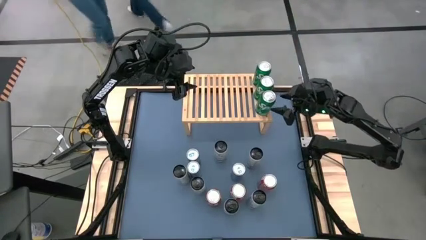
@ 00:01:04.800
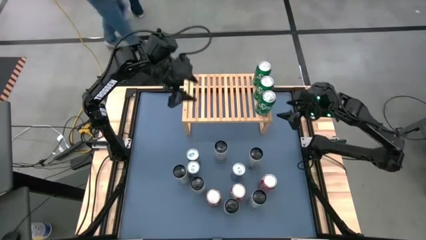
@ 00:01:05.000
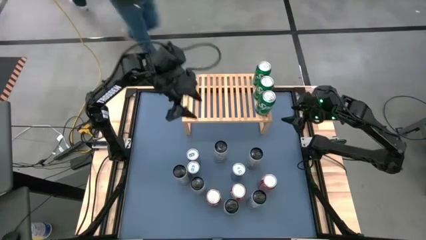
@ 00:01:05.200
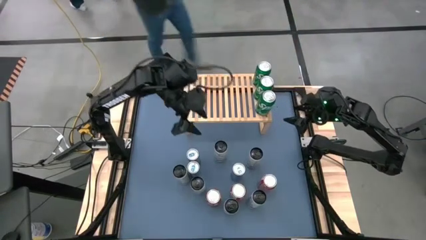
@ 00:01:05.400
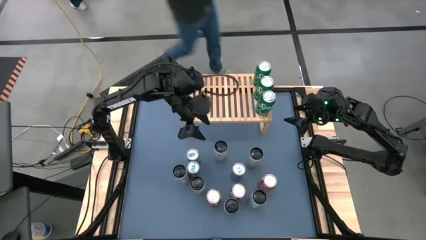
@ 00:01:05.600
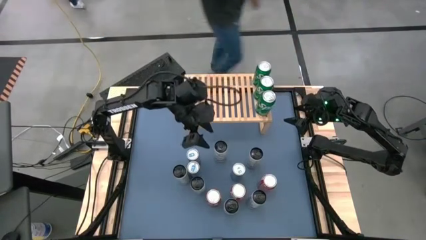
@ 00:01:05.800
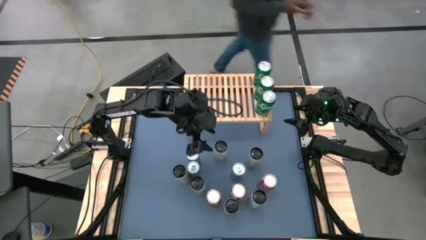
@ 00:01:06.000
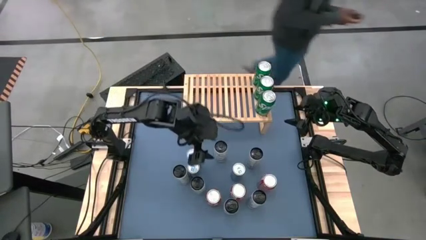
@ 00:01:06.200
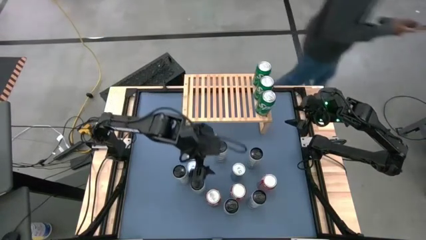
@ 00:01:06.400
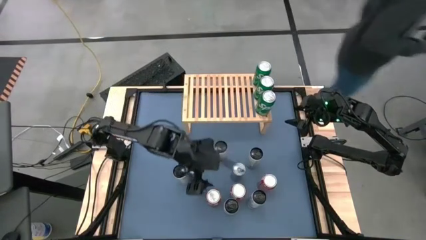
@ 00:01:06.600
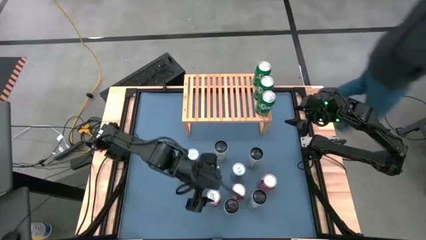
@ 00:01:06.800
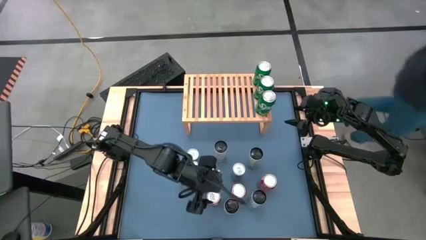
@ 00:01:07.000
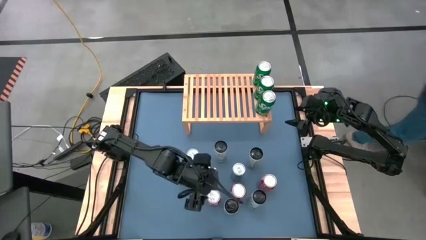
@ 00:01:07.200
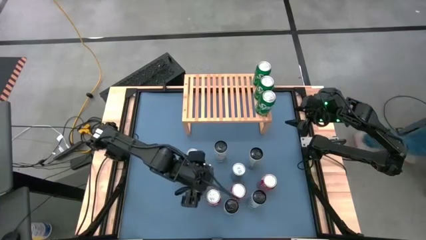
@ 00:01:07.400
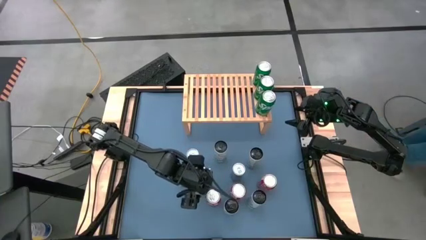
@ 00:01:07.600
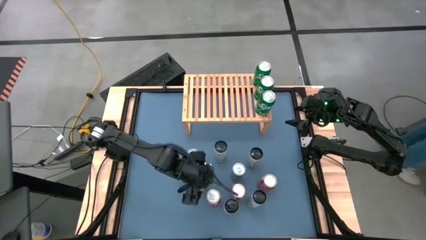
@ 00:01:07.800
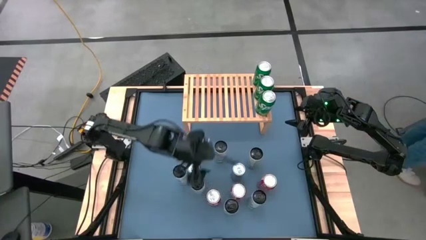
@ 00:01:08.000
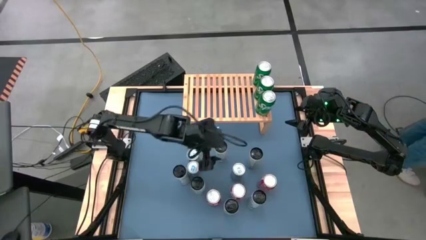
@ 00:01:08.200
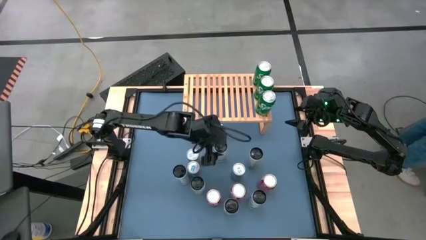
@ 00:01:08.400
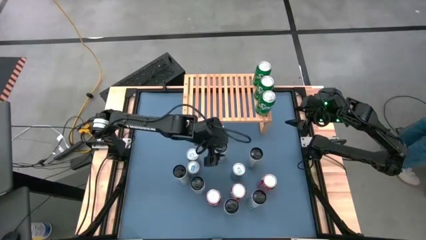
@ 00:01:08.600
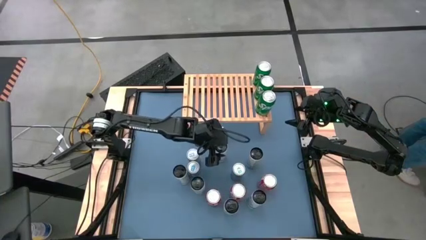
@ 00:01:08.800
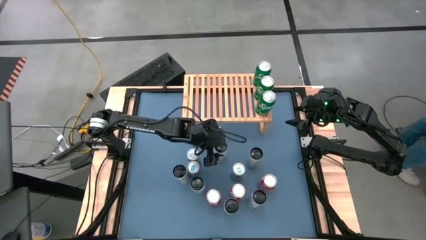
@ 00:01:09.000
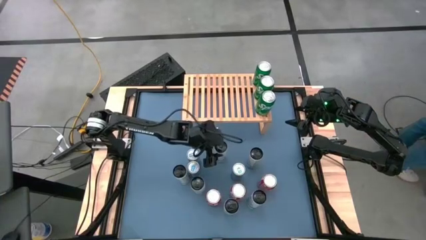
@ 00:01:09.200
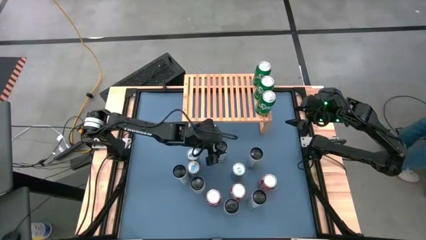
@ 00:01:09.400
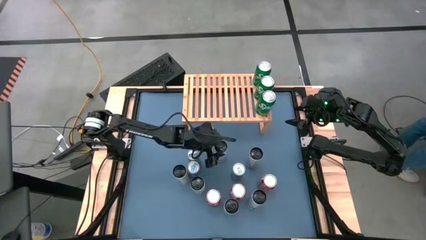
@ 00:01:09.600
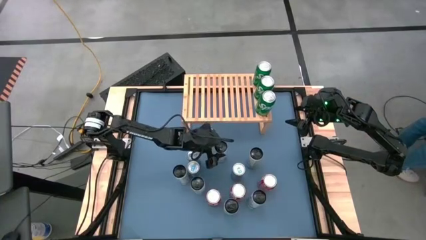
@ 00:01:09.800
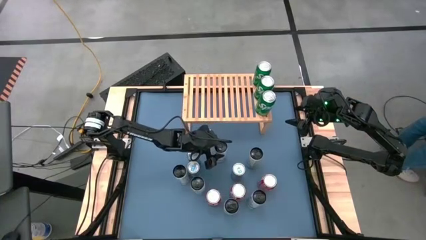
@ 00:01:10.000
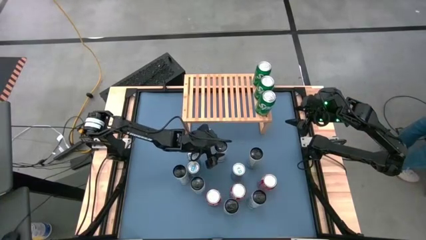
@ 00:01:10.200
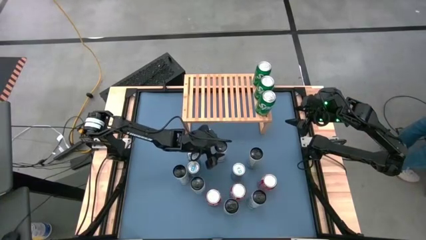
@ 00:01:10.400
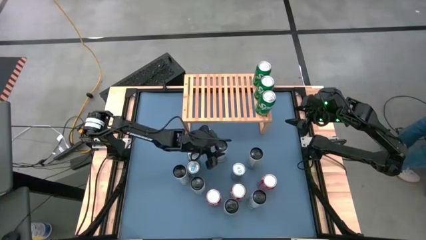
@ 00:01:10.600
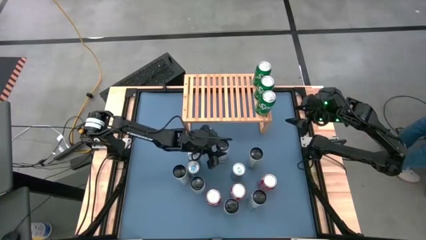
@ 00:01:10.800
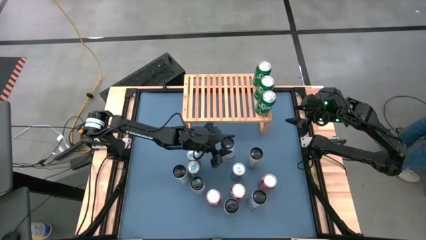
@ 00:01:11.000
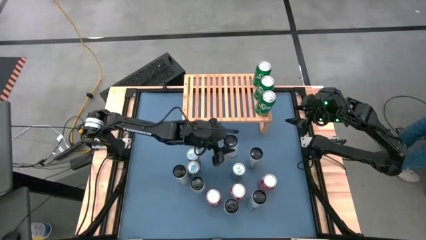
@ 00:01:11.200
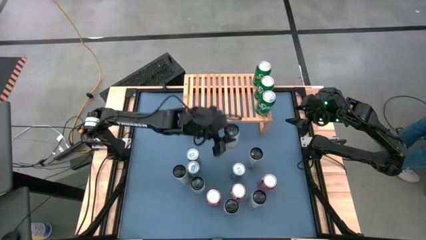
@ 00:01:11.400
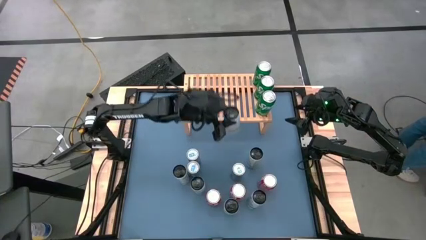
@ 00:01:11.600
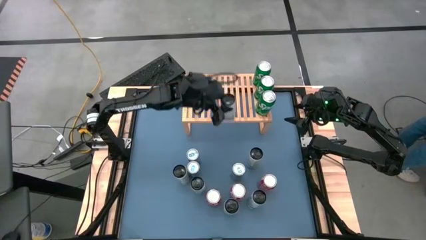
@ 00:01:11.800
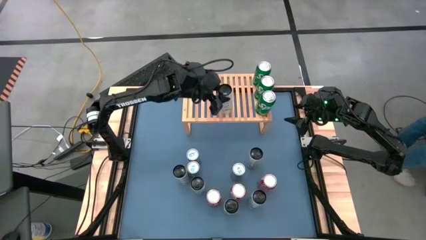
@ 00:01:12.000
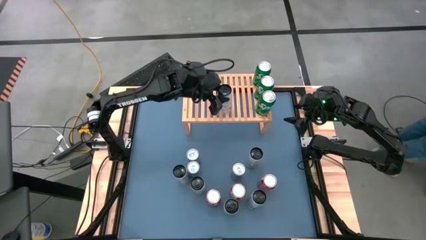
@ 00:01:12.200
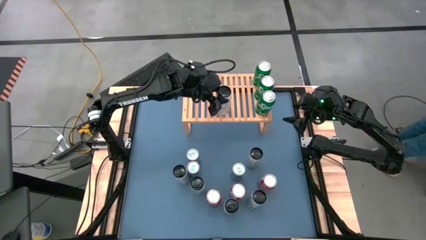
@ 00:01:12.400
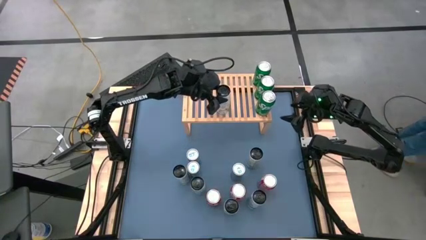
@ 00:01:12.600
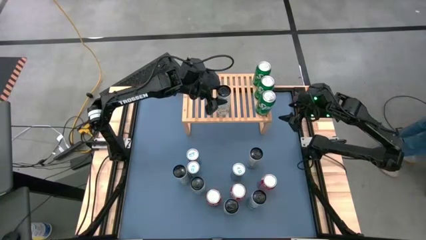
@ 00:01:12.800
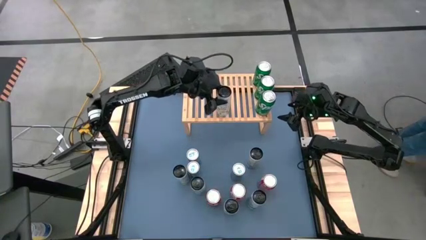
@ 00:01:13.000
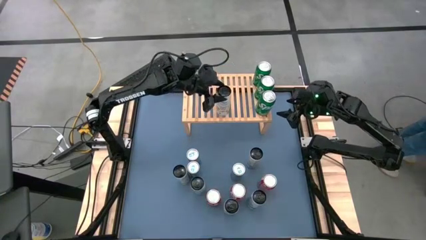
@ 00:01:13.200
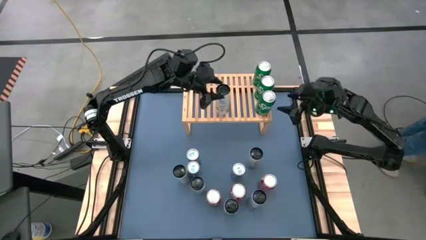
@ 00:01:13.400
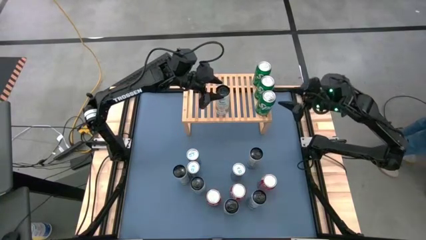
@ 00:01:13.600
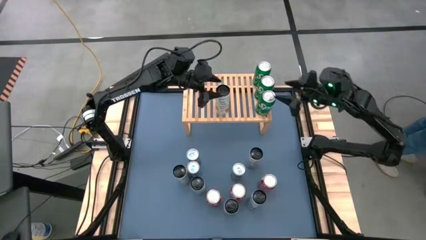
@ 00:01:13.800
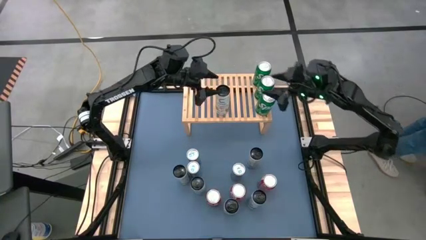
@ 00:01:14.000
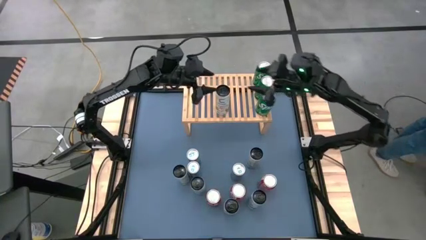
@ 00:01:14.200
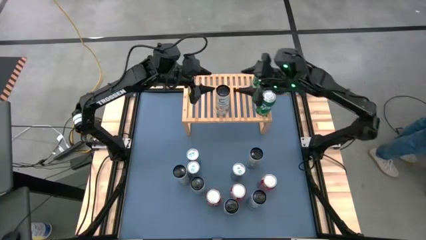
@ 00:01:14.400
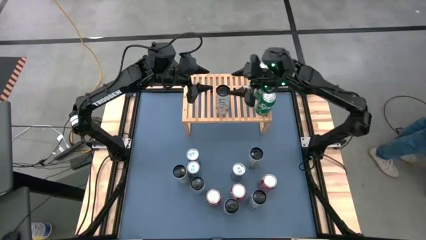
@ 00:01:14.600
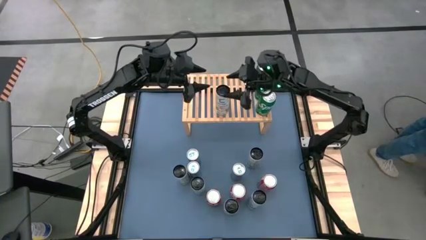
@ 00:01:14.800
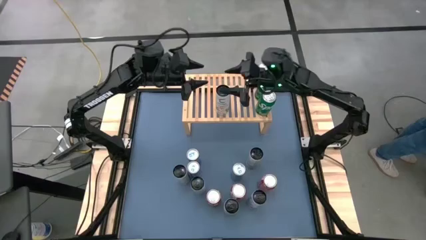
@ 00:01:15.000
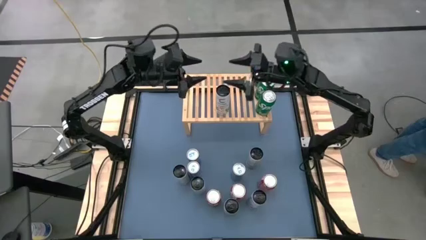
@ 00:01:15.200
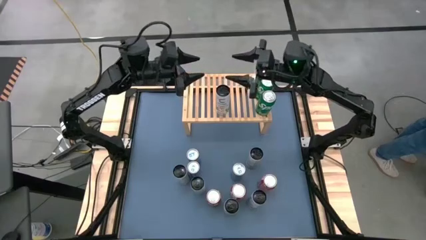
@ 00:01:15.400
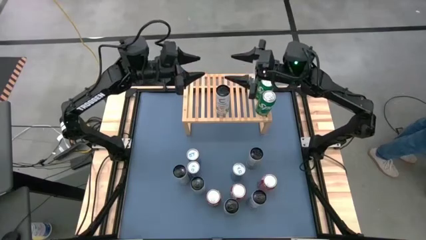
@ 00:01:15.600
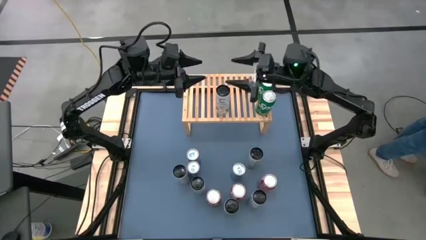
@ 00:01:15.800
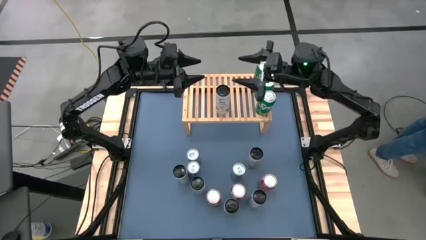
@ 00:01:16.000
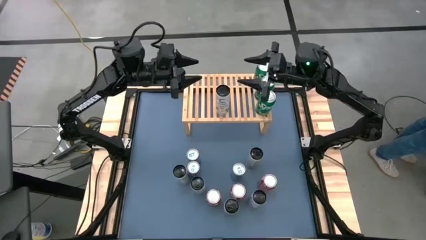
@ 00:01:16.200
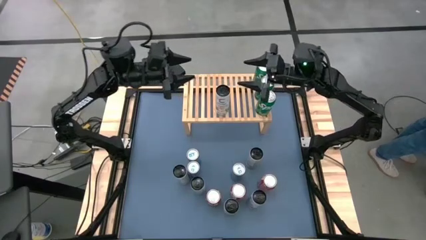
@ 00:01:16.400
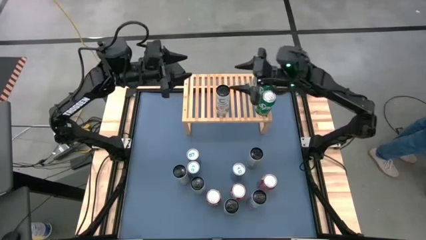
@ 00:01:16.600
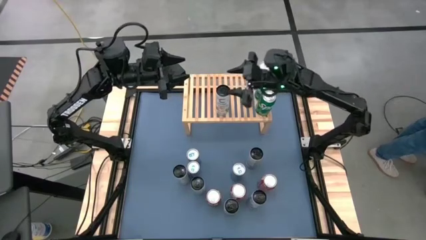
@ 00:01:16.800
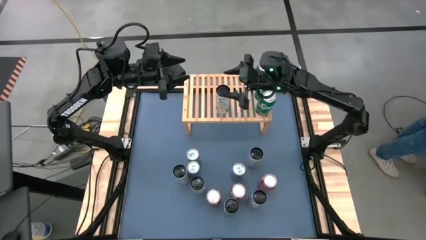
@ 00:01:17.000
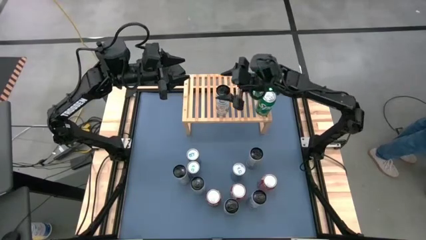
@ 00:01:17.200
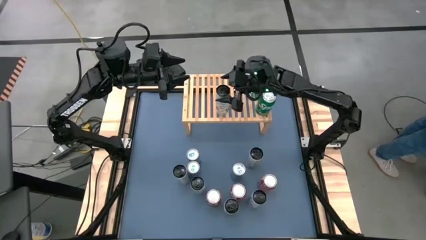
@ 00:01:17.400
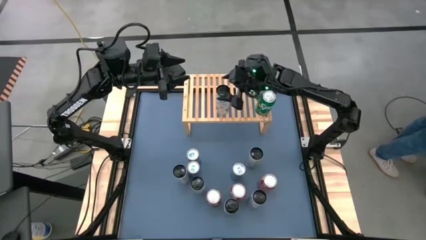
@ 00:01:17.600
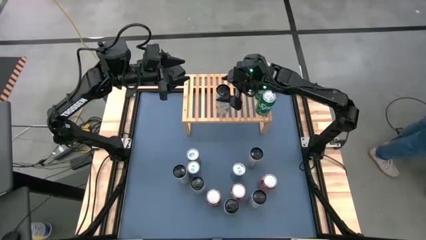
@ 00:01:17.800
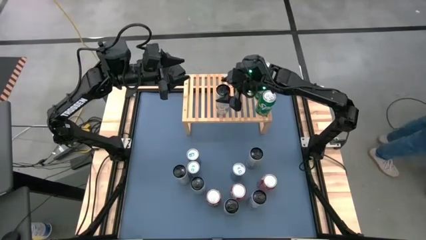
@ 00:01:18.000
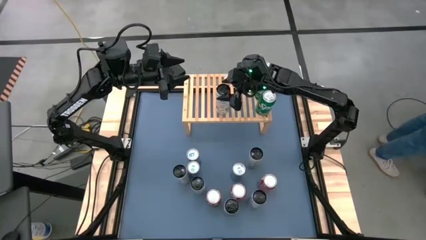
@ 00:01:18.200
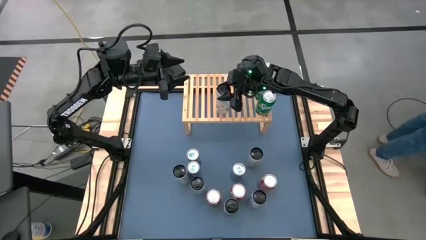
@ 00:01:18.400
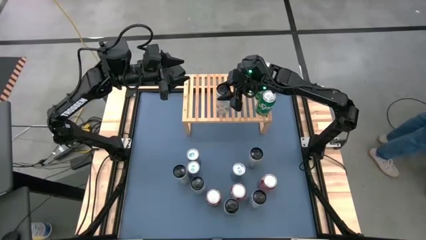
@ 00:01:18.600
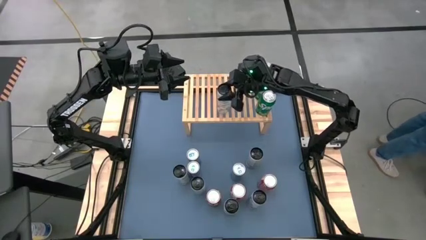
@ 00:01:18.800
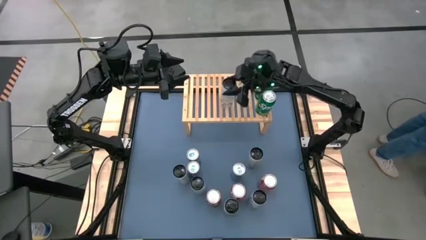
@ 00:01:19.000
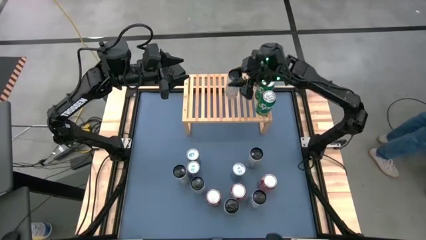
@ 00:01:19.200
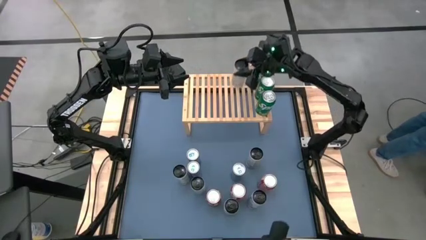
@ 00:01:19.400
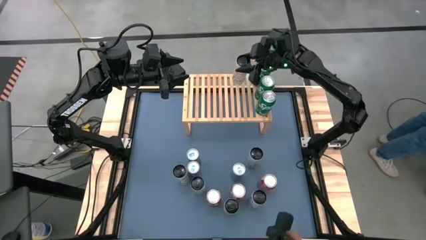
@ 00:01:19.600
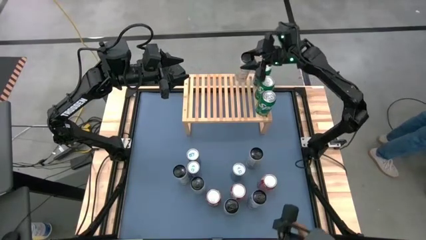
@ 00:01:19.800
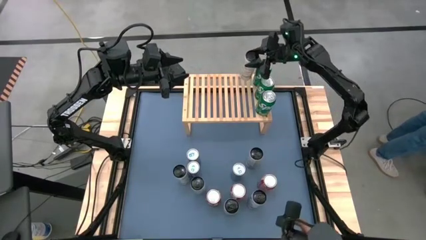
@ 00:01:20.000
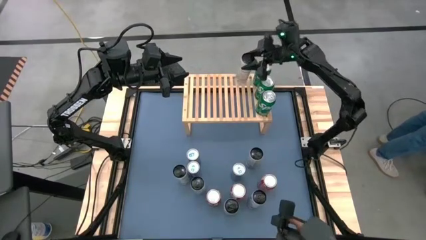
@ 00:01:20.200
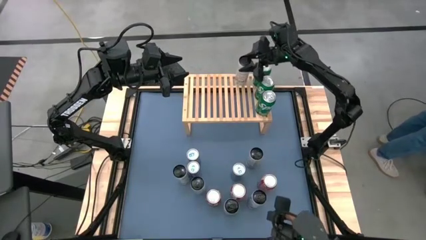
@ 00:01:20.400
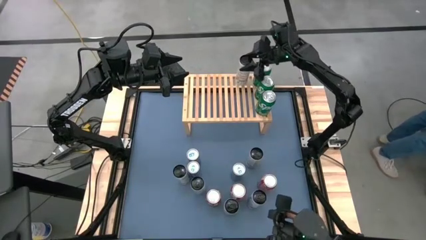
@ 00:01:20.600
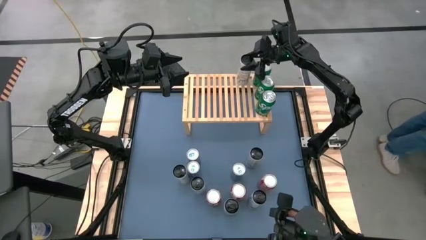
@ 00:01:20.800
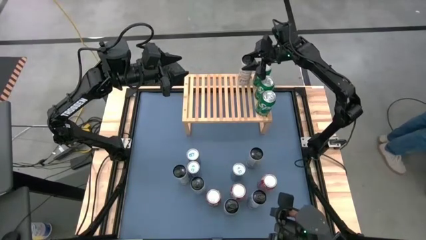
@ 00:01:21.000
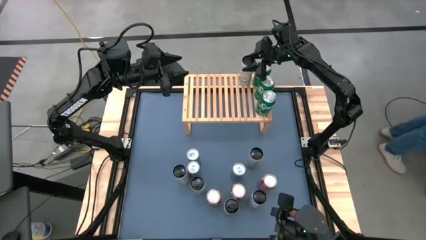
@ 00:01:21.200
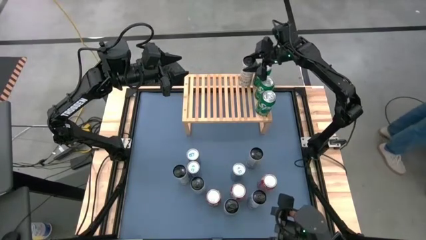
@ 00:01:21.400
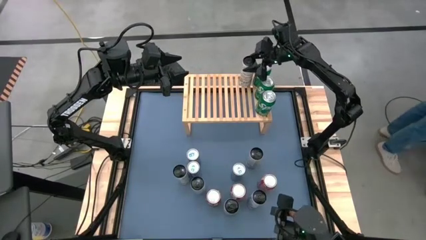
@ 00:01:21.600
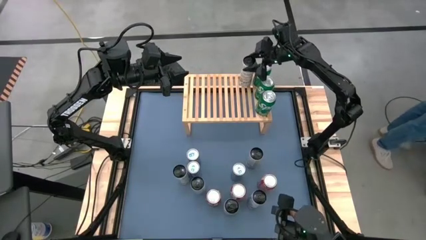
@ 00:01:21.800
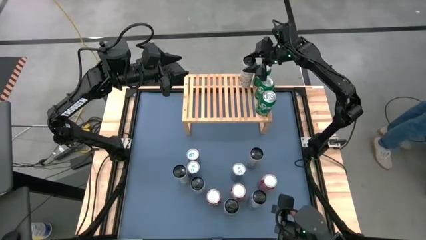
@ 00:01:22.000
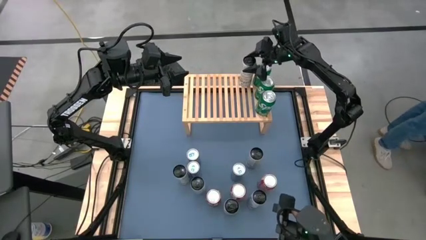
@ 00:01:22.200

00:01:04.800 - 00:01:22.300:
Task: Place canned beverage on shelf
Put the top left white-yellow soda can on the shelf
